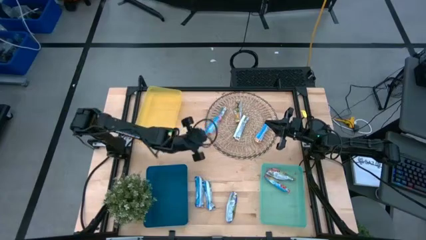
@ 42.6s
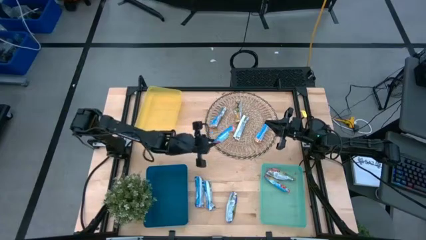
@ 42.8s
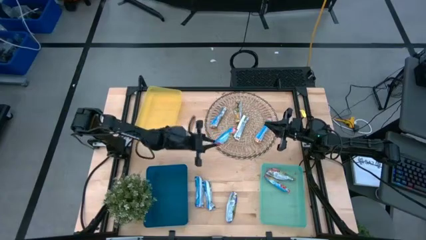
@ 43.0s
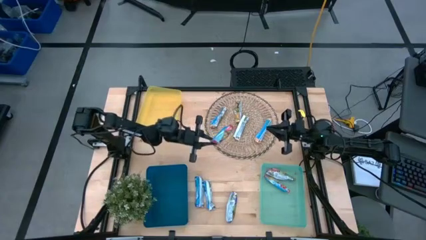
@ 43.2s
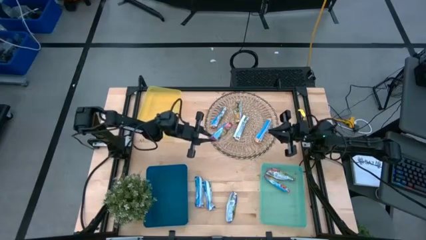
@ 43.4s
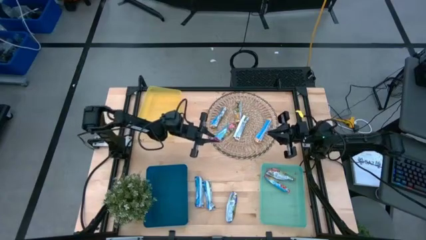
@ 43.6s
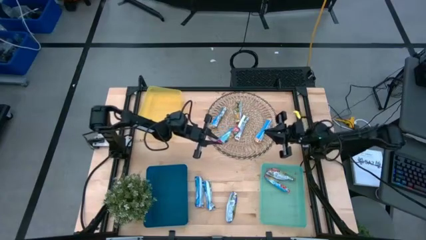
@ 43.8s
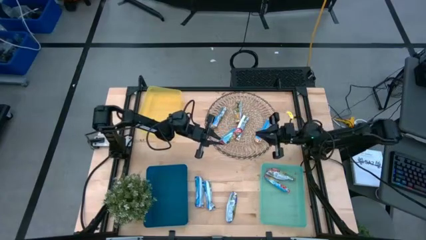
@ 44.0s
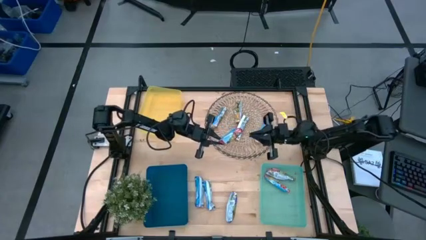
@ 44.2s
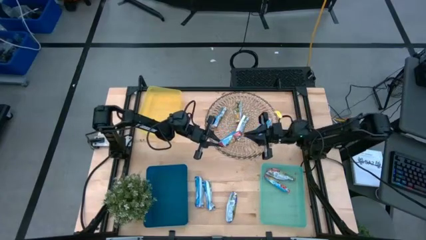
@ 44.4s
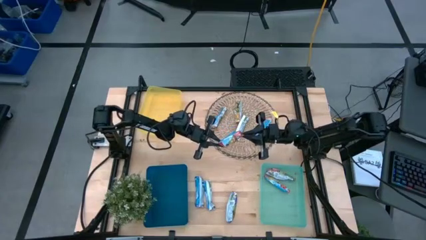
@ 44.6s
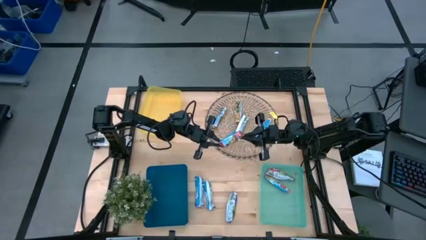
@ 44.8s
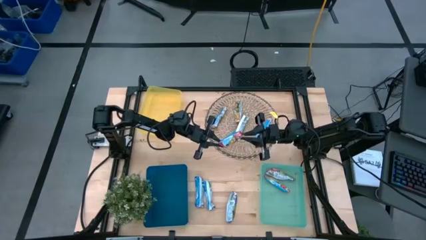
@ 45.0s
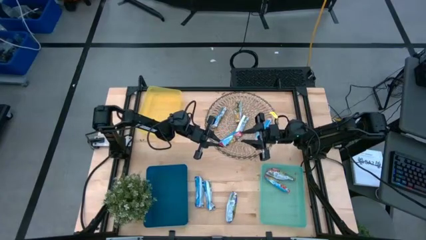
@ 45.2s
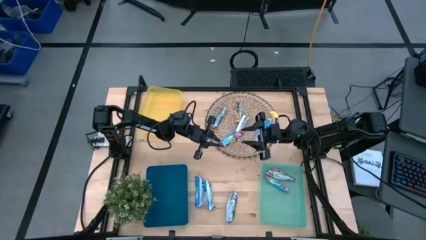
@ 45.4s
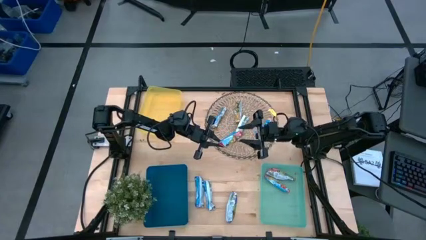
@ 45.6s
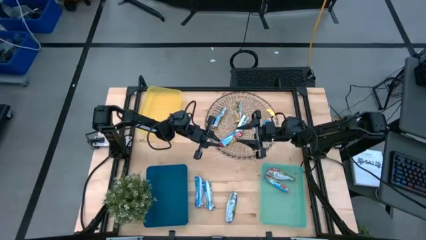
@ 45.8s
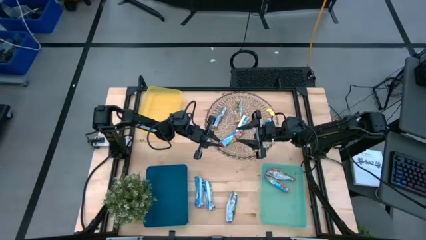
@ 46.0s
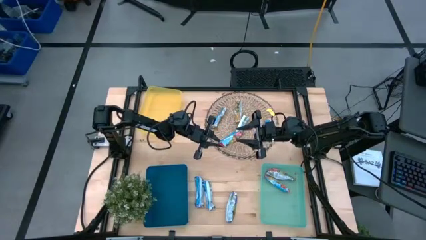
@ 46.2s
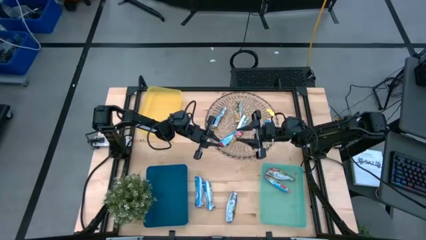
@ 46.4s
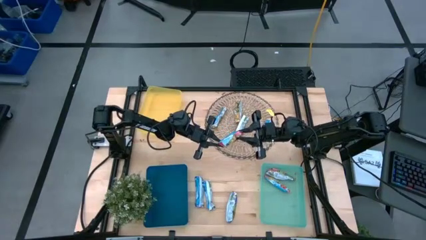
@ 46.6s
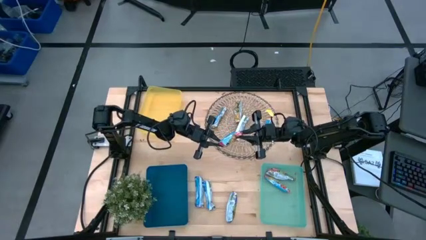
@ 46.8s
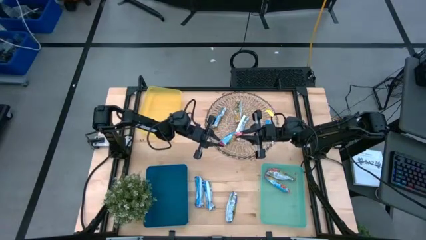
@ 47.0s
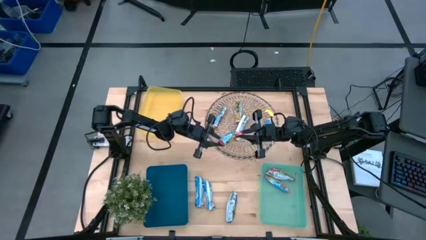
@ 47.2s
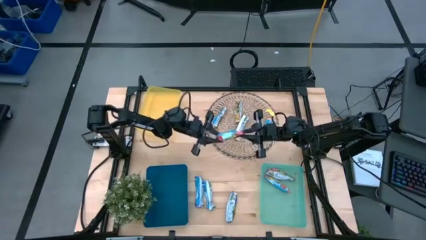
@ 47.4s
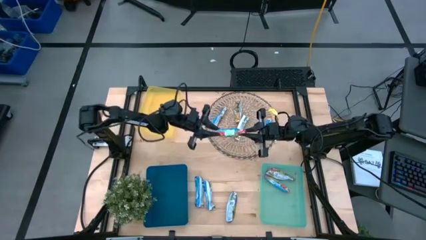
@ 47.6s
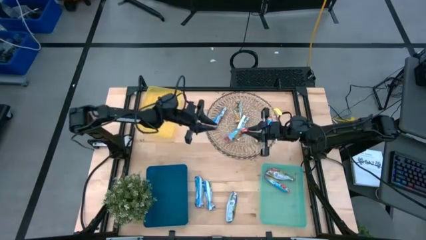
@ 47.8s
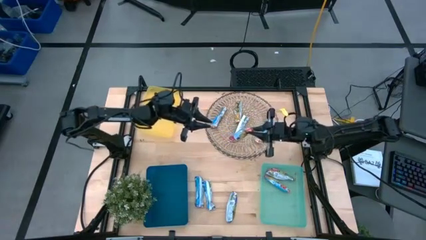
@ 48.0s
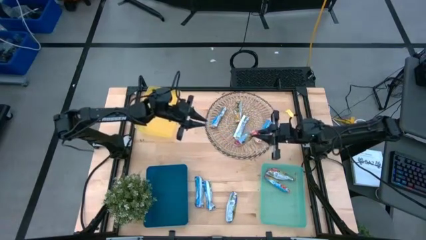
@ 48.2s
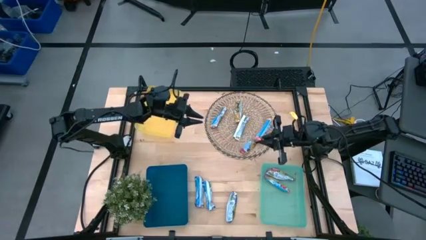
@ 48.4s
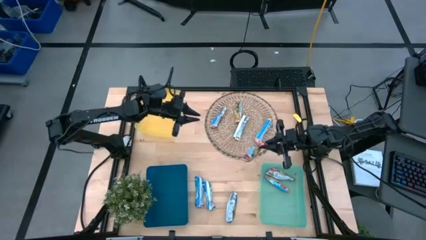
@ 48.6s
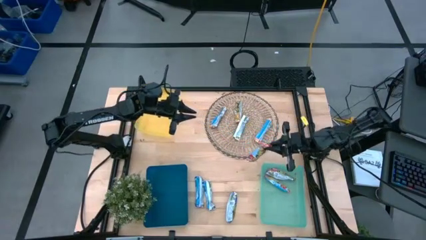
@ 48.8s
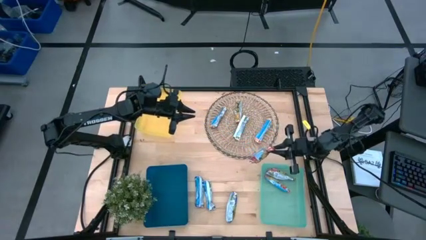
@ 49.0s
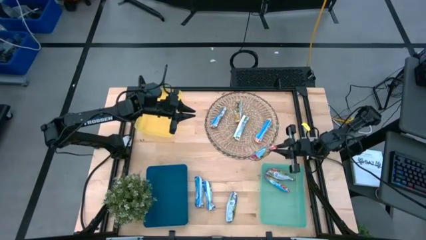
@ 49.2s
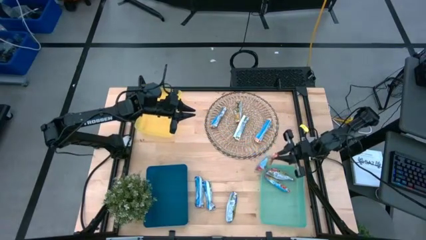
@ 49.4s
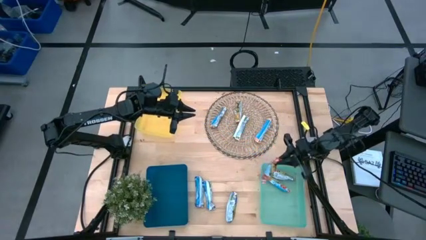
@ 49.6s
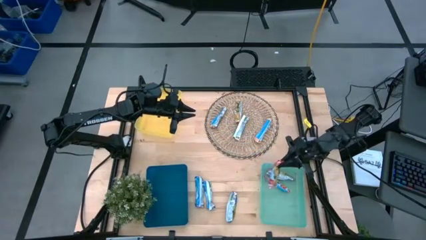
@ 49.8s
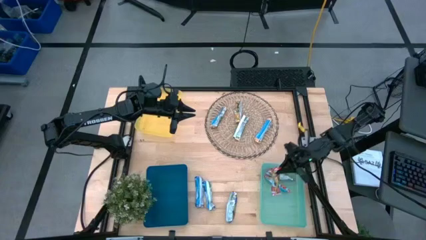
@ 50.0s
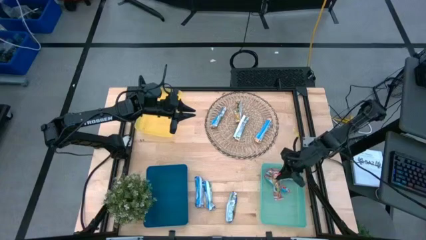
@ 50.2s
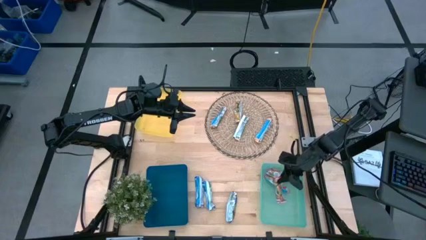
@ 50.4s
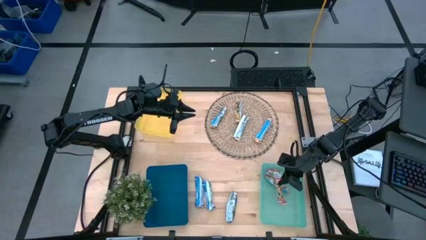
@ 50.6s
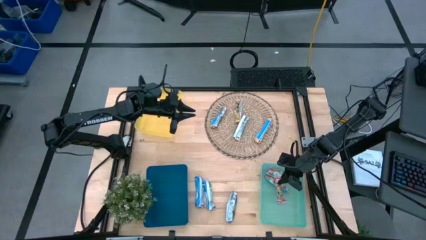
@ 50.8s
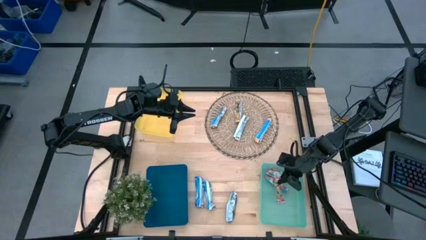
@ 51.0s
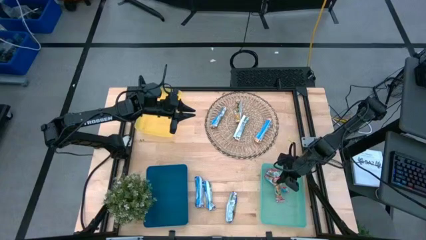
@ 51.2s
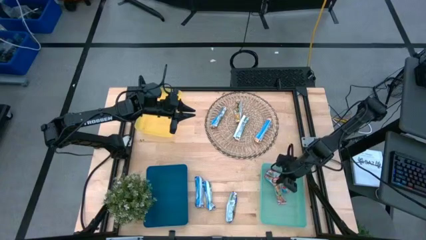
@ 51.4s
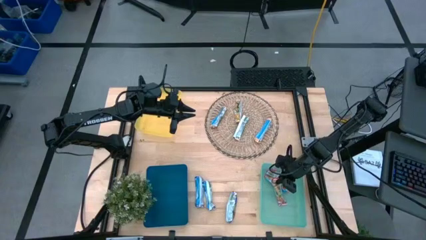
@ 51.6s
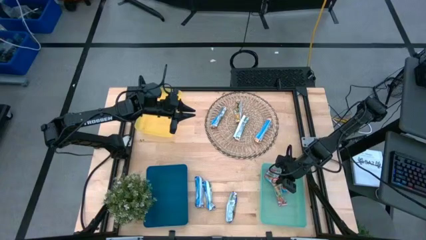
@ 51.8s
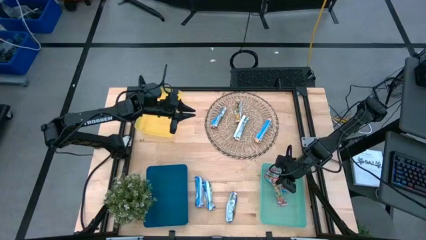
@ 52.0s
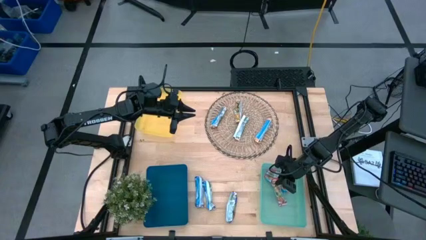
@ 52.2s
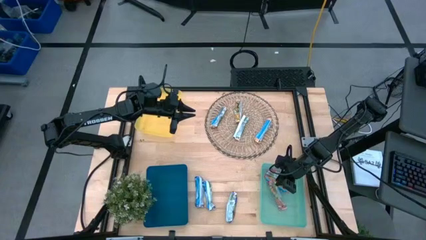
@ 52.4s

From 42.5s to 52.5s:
Task: Pick and place Granola Bars by type
Put the red granola bar into the light blue bin
